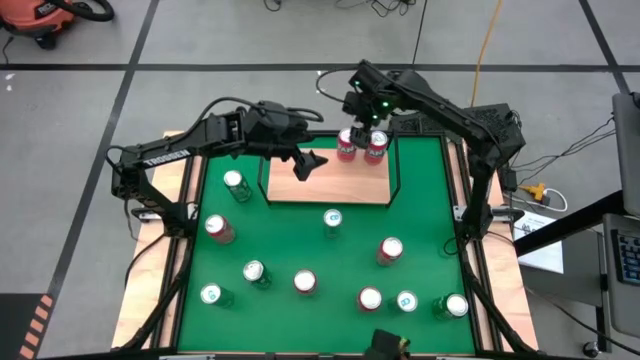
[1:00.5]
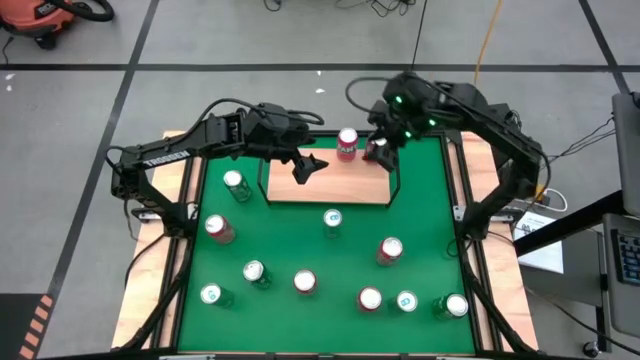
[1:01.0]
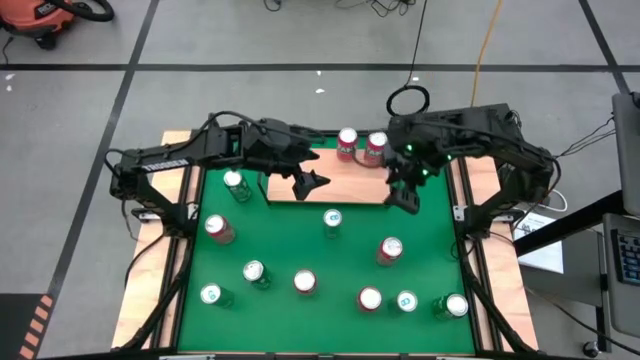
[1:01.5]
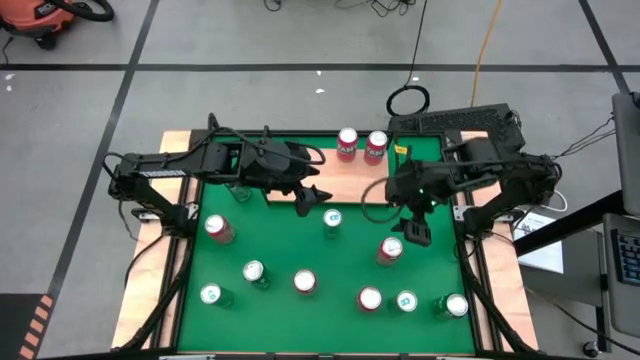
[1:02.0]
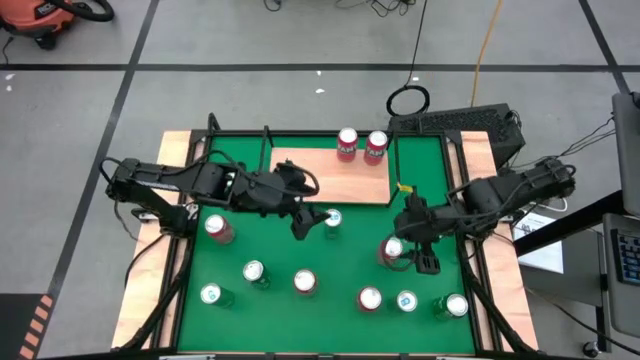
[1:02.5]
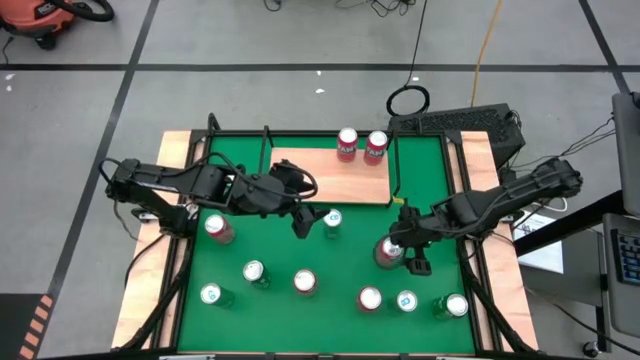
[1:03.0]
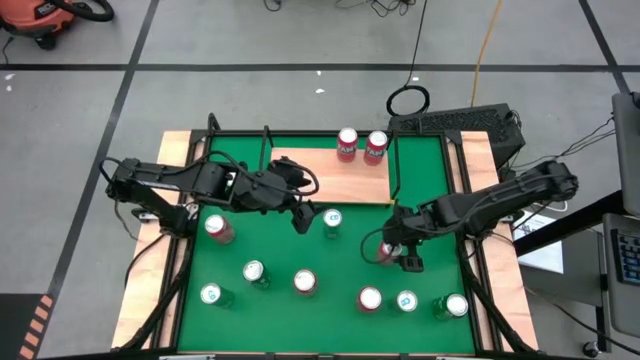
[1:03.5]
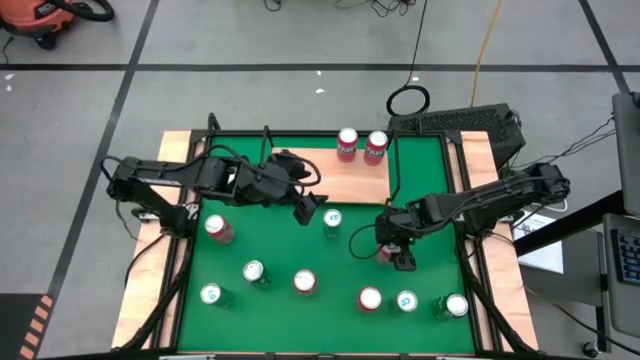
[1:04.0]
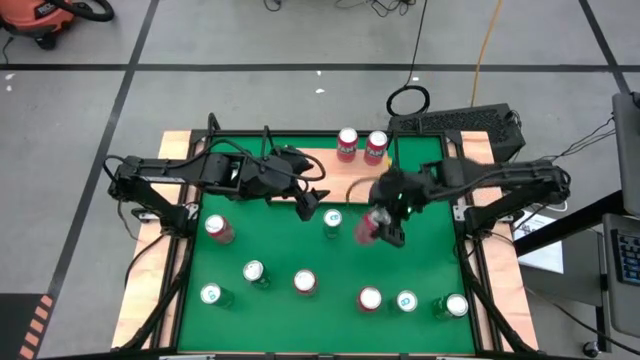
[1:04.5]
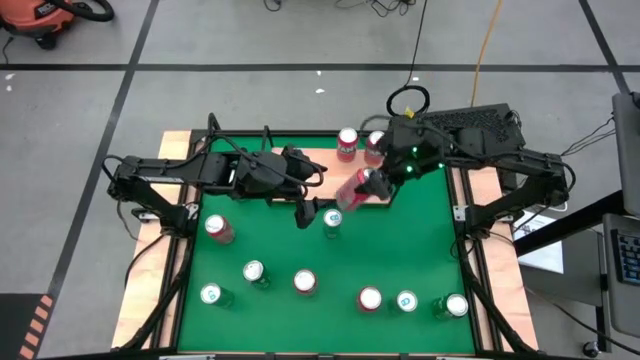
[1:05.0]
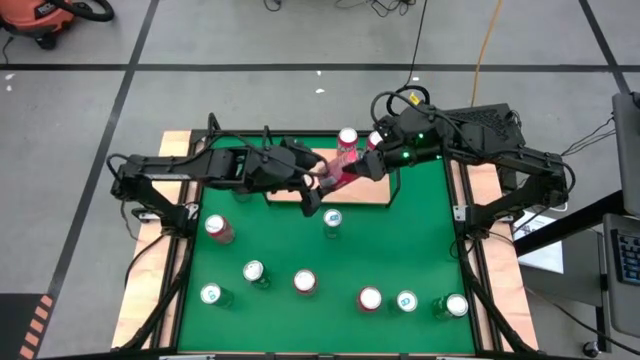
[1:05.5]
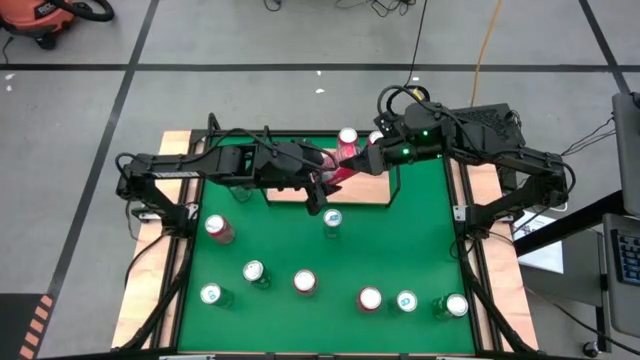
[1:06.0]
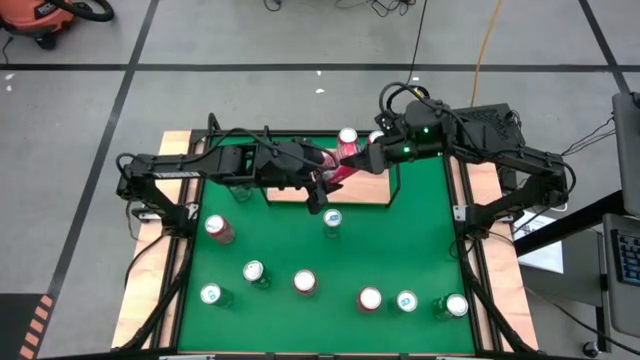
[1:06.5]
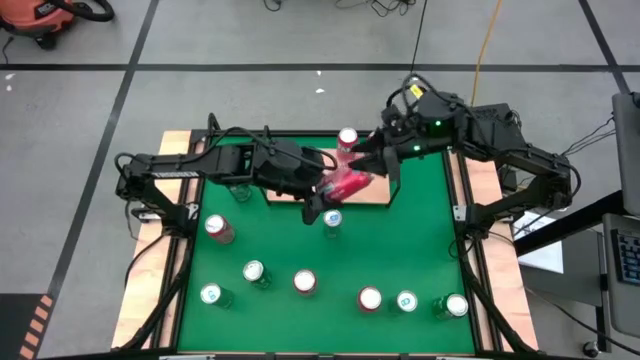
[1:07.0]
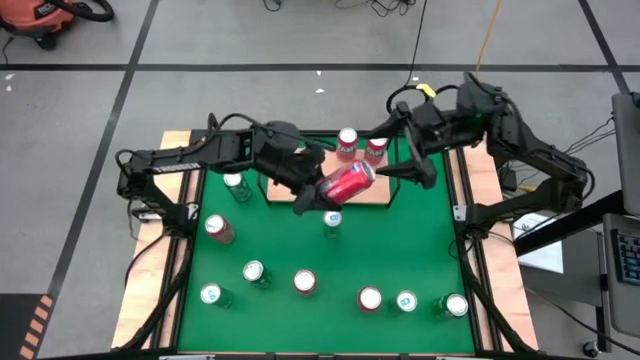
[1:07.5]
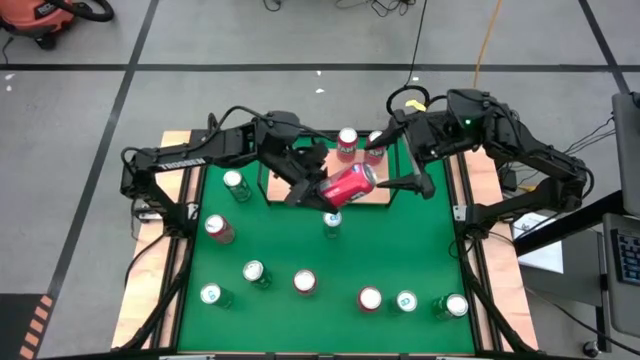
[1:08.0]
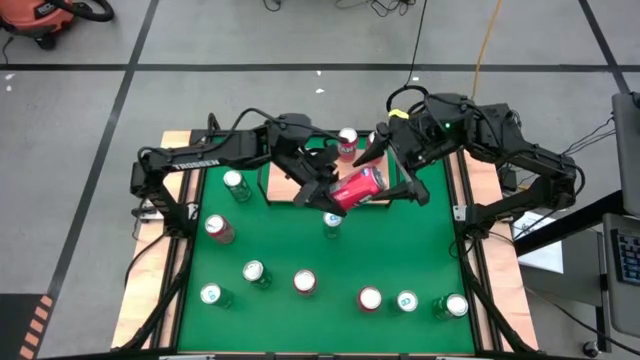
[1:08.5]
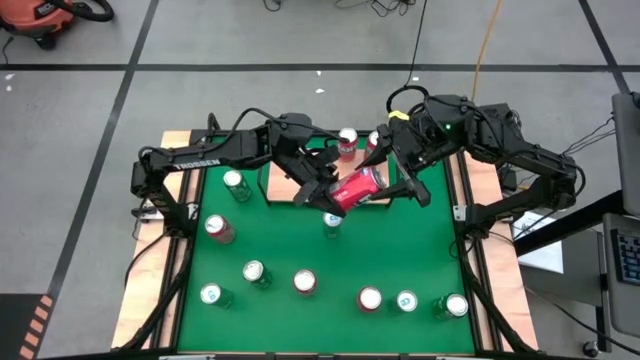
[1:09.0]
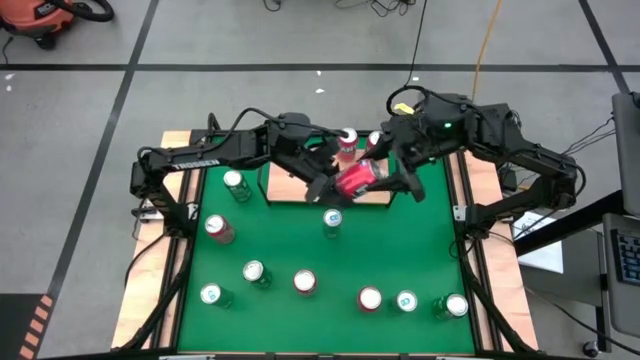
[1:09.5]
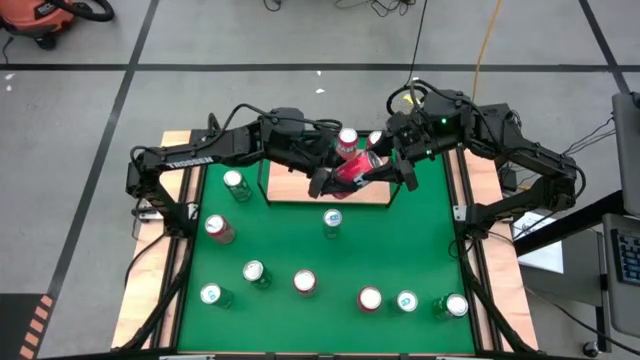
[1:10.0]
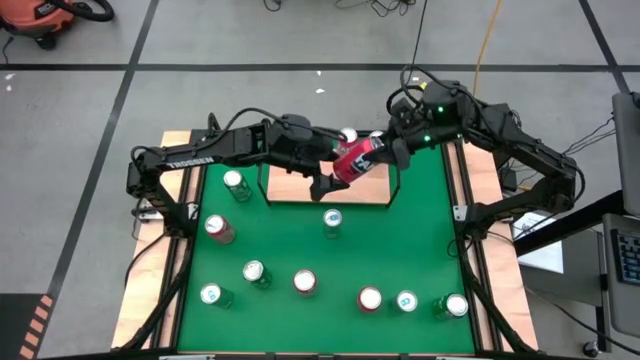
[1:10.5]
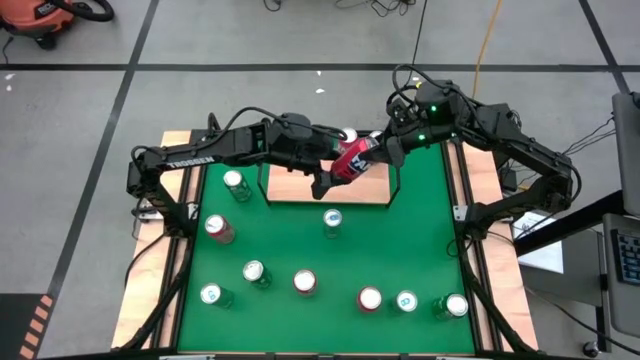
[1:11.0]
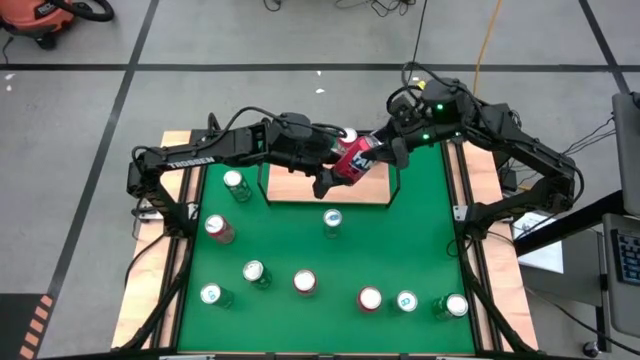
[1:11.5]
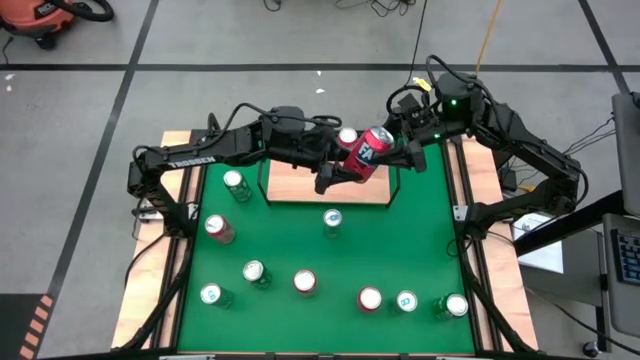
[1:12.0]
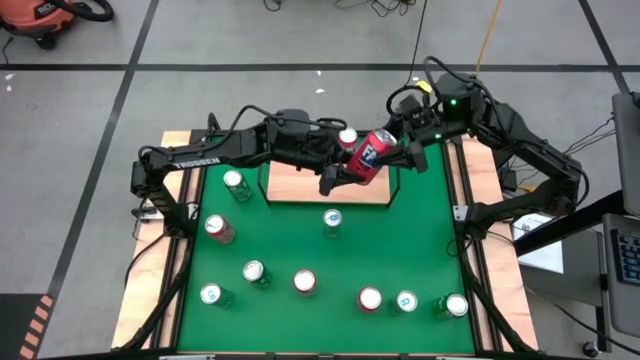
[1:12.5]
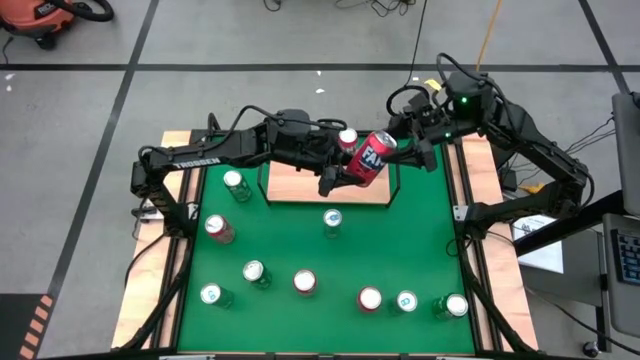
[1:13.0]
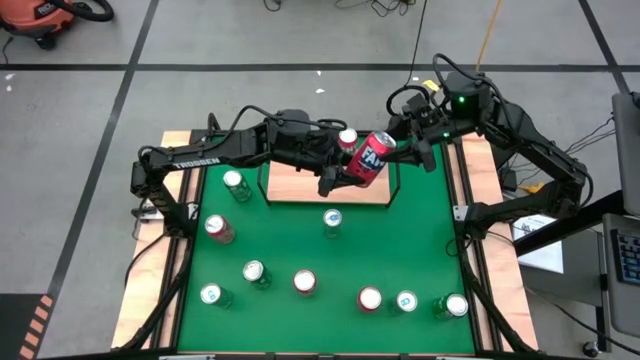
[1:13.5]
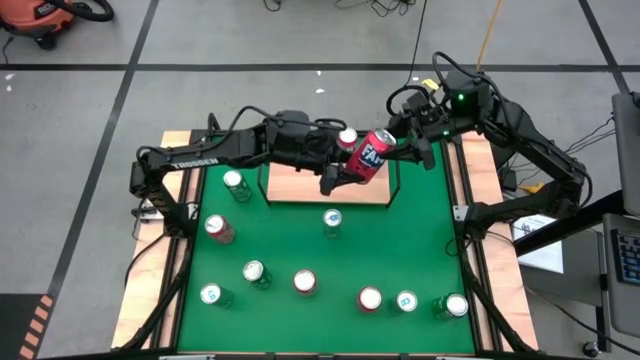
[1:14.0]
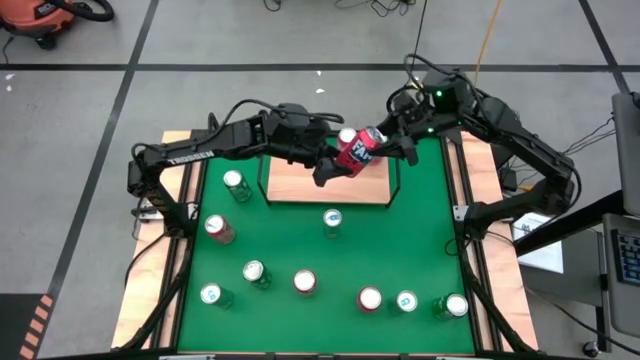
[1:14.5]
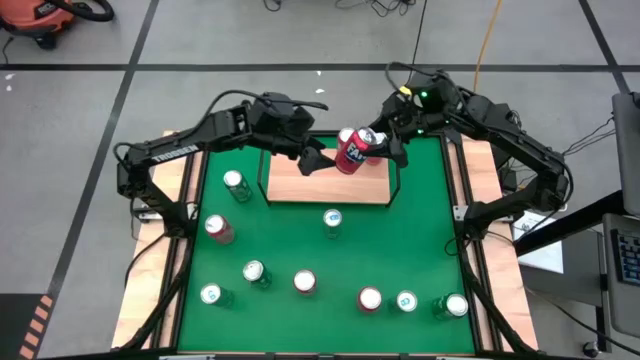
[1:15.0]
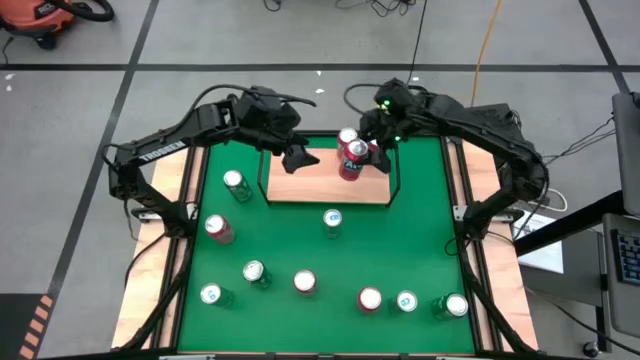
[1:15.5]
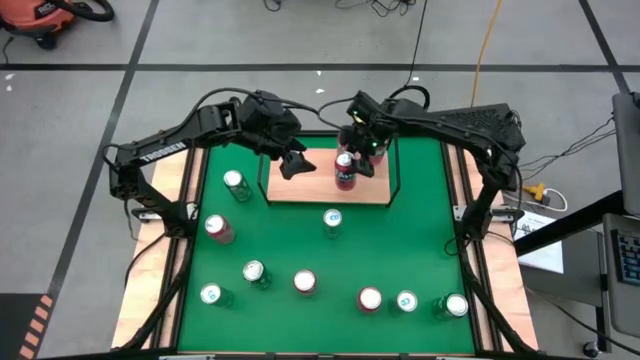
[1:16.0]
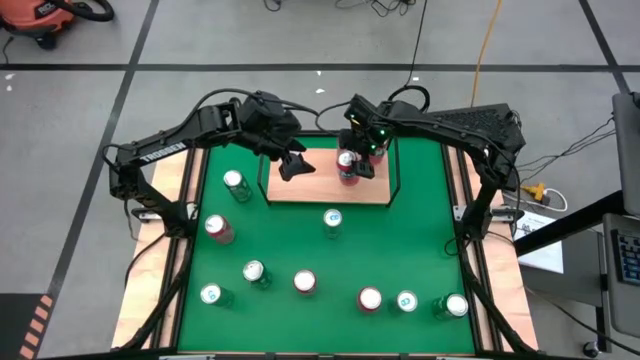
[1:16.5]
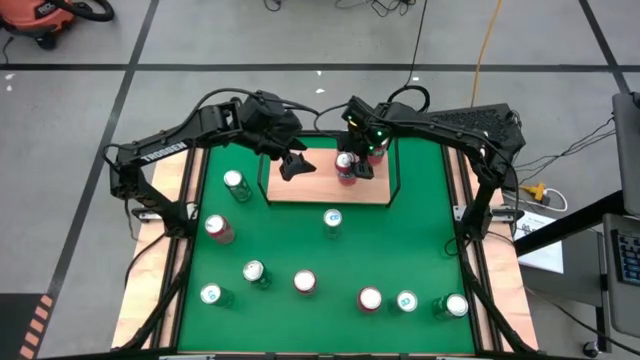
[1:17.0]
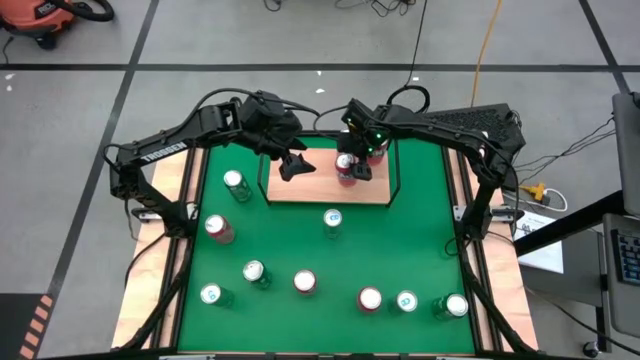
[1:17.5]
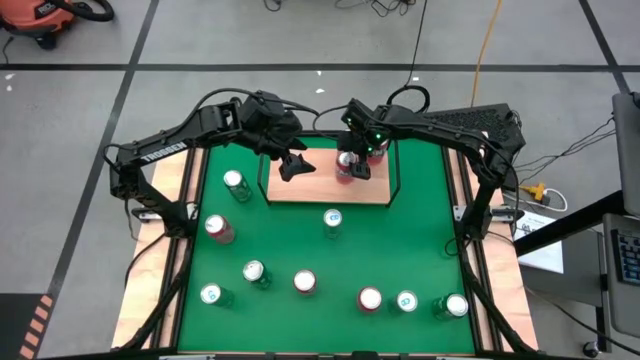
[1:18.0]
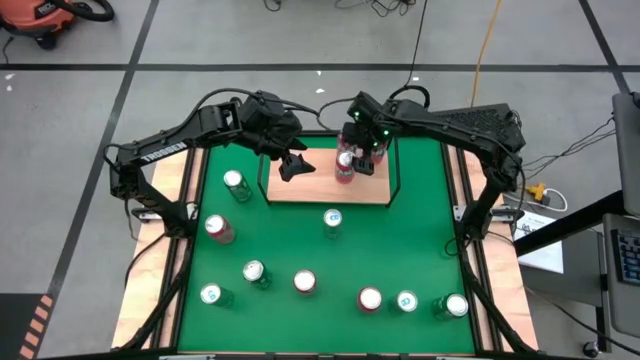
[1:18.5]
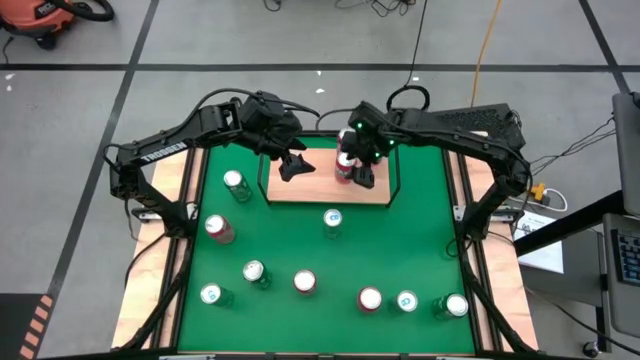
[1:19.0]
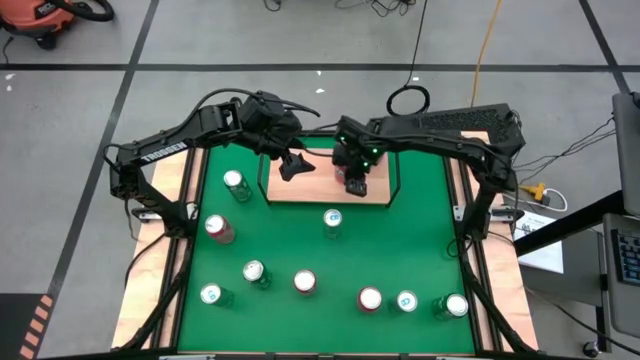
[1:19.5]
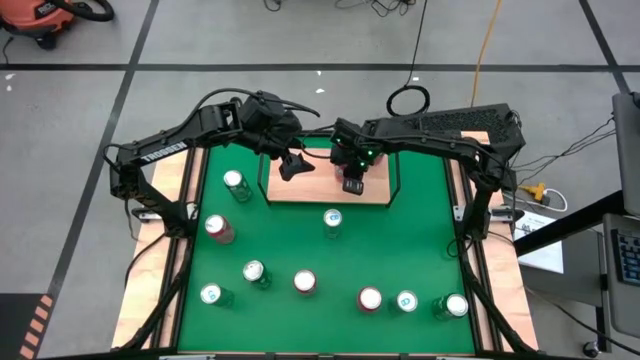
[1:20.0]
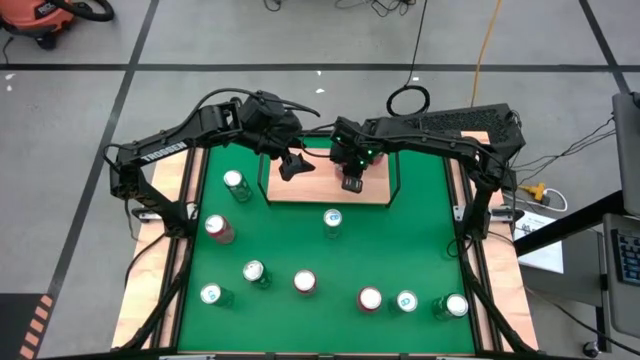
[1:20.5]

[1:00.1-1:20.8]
Task: Place canned beverage on shelf
Put the red soda can aligned with the other red soda can on the shelf
